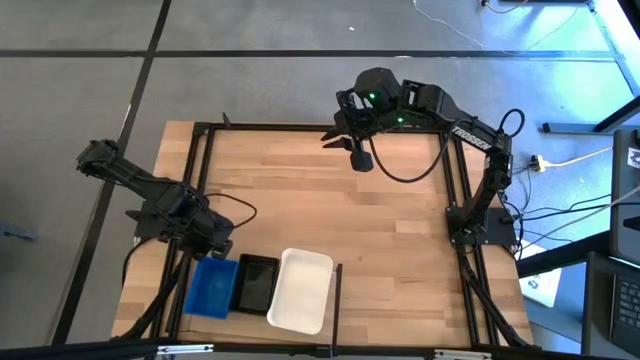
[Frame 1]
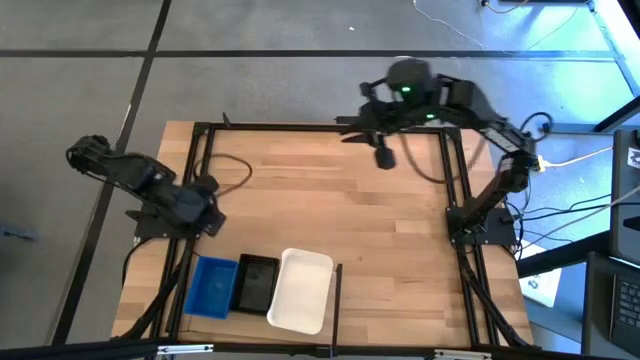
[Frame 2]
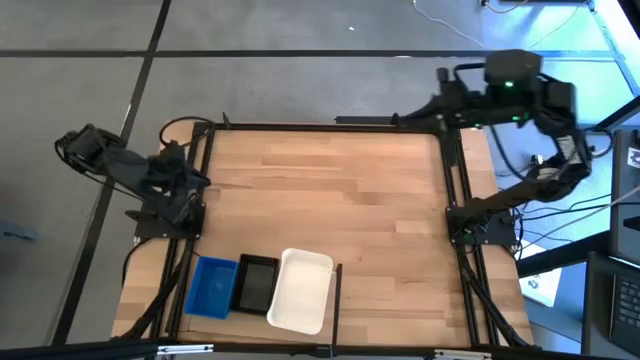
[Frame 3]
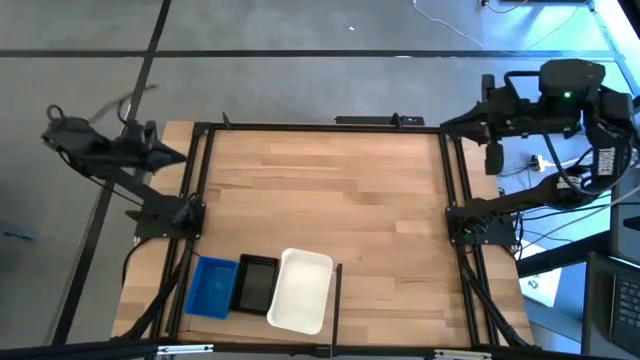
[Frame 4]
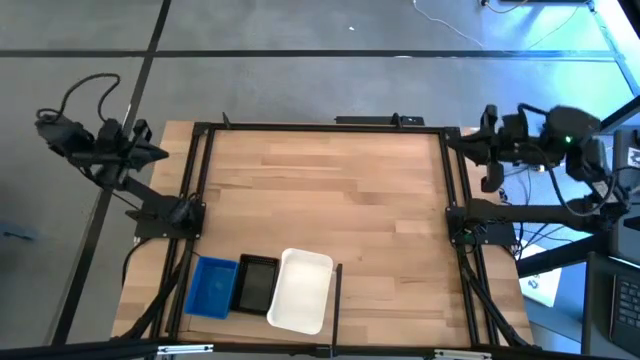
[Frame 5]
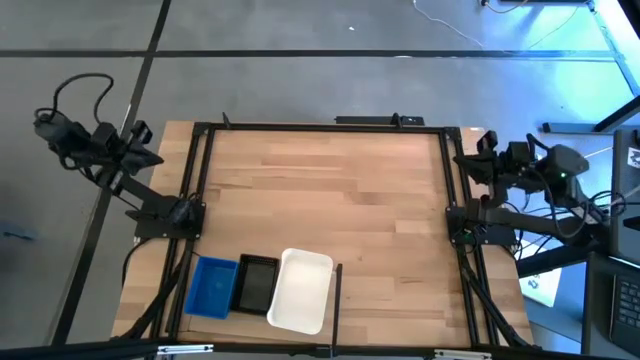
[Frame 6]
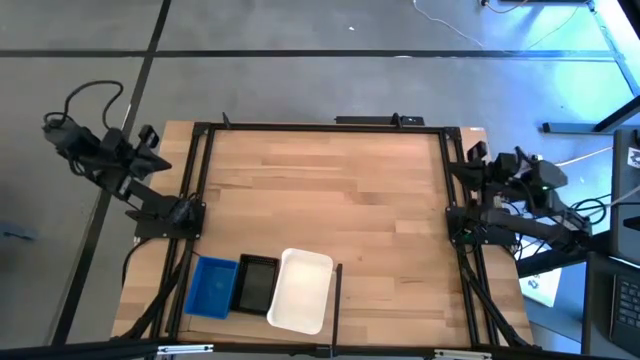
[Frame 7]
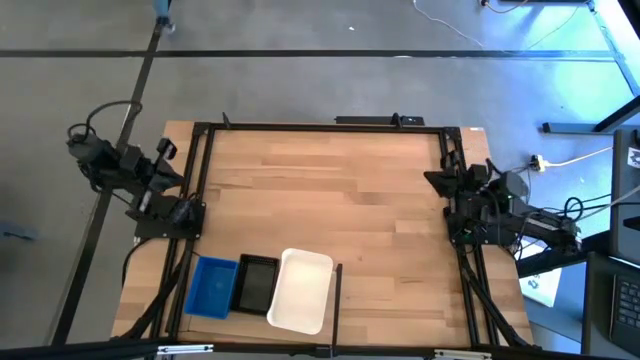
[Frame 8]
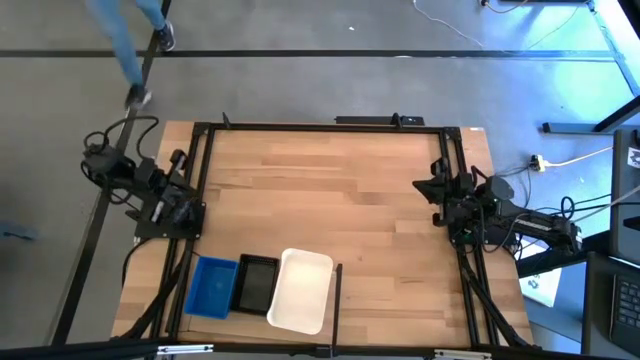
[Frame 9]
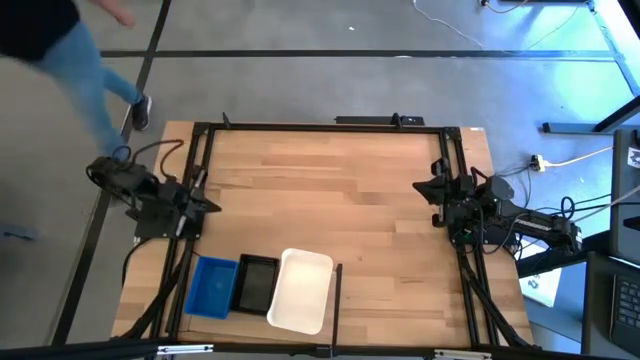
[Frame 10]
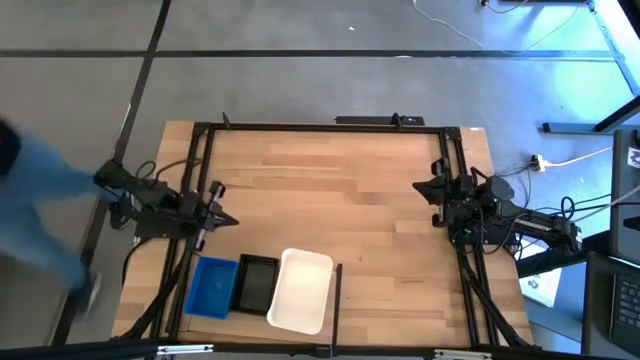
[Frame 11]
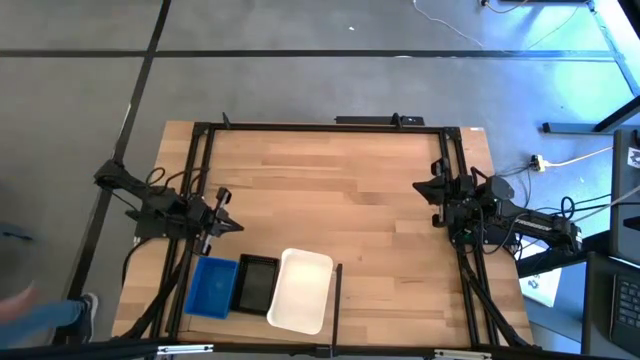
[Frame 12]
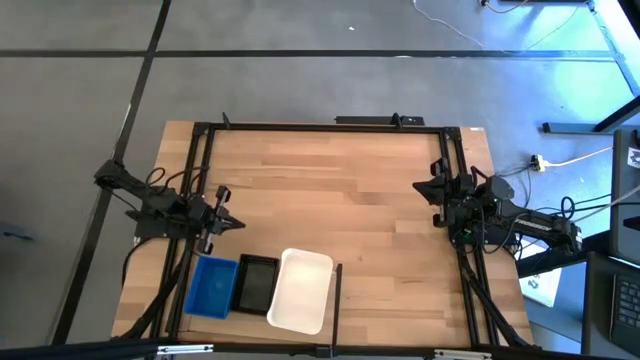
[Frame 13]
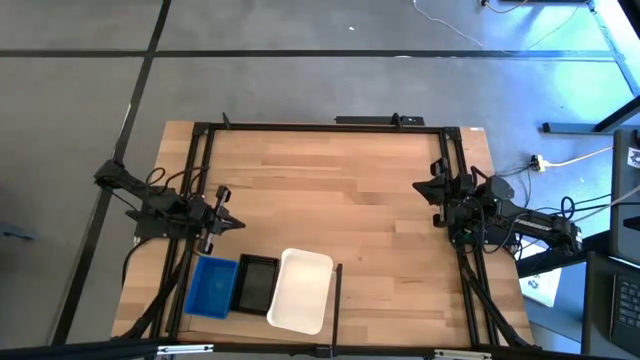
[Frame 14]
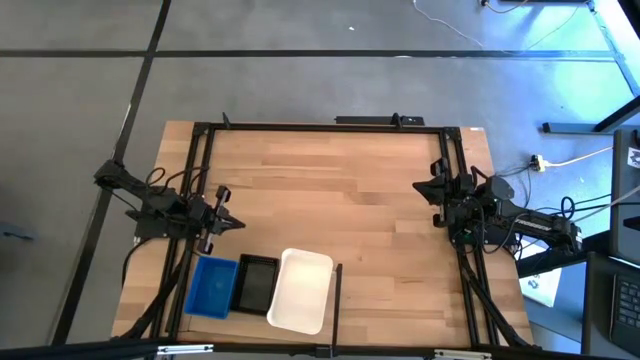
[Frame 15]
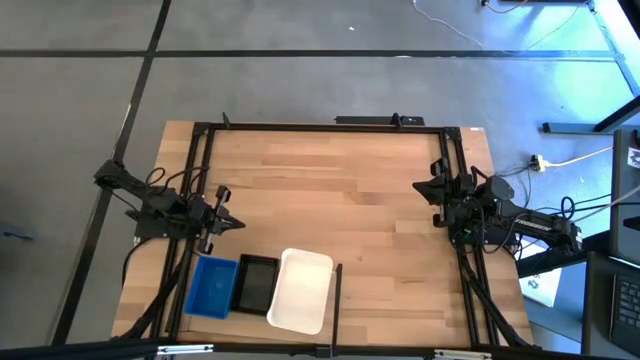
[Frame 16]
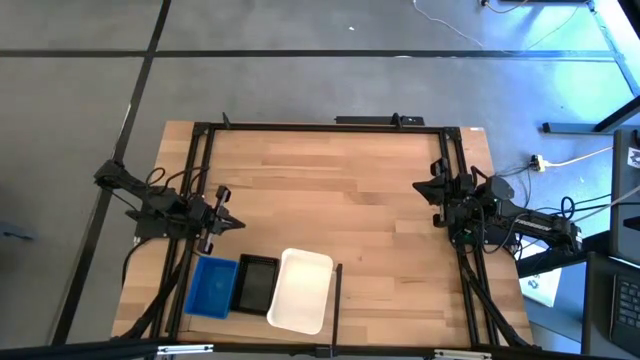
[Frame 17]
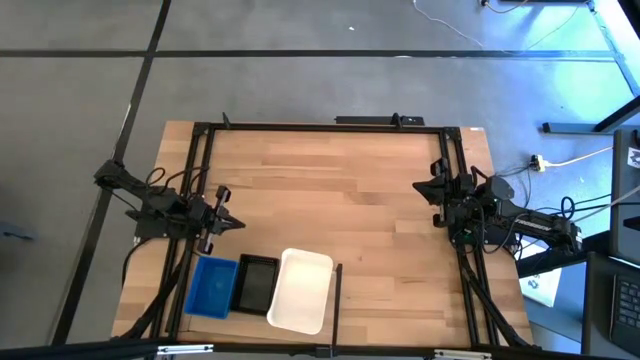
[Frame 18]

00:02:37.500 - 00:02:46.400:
Task: Stack baskets on shelf by color
Return to Home Position

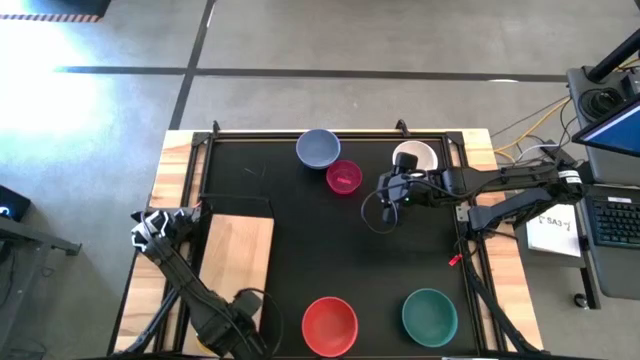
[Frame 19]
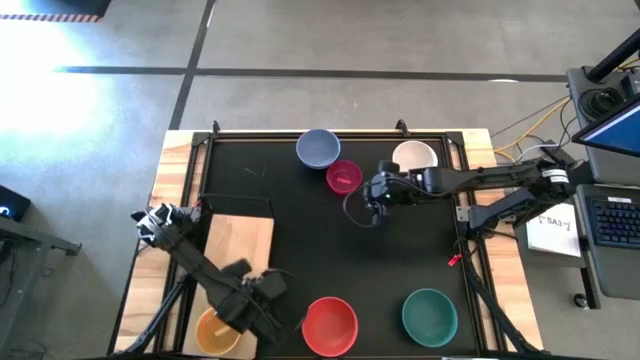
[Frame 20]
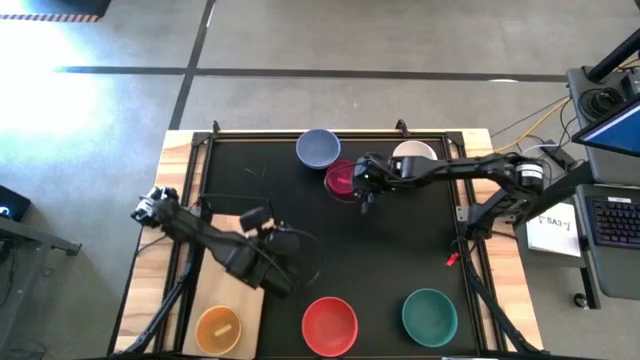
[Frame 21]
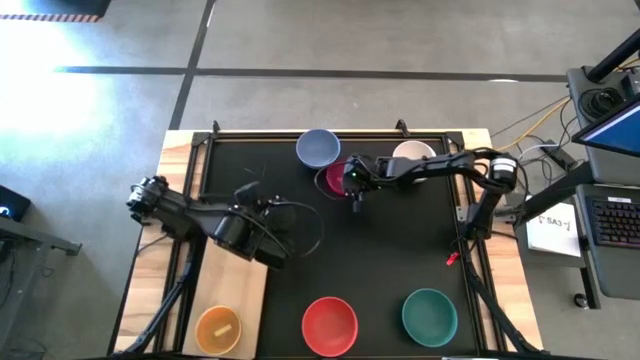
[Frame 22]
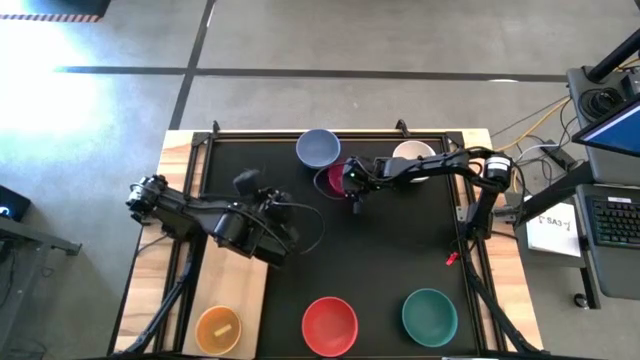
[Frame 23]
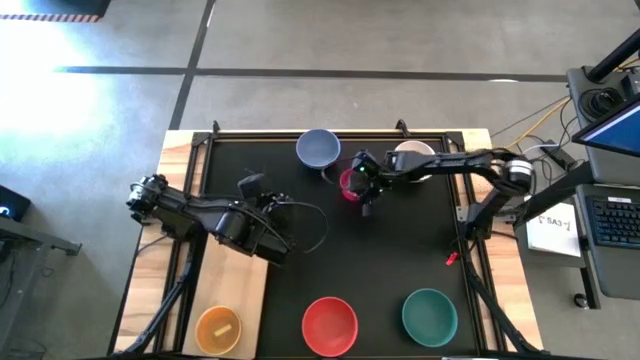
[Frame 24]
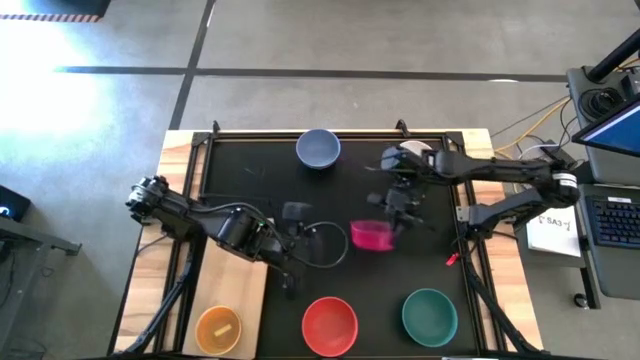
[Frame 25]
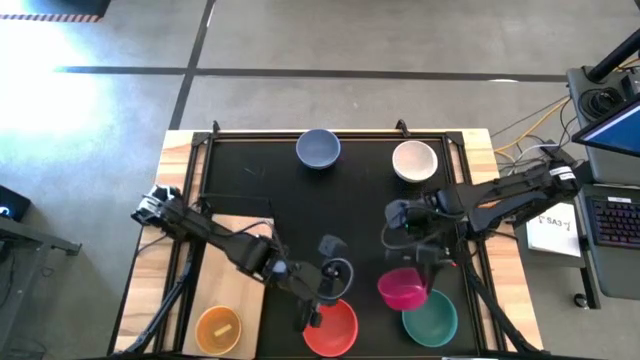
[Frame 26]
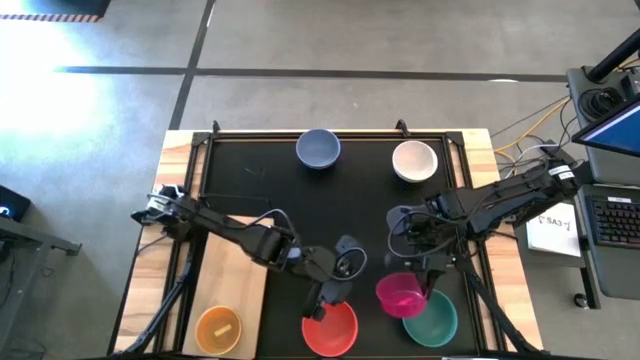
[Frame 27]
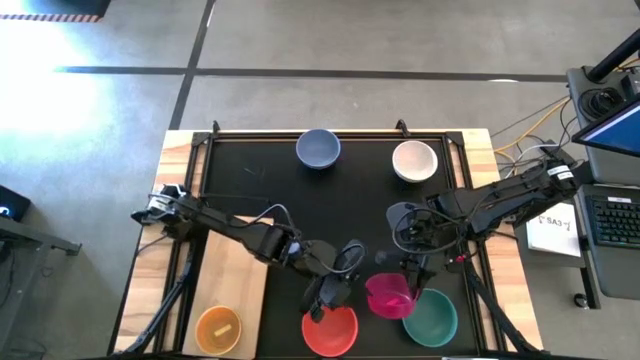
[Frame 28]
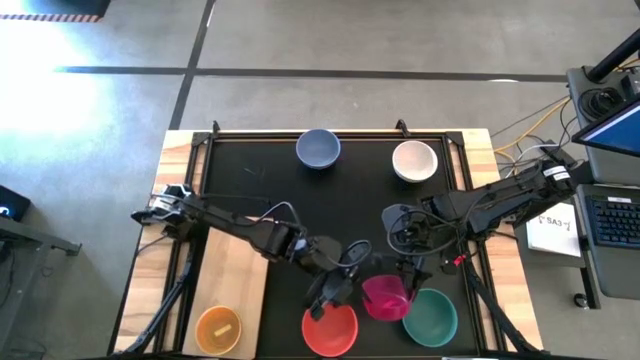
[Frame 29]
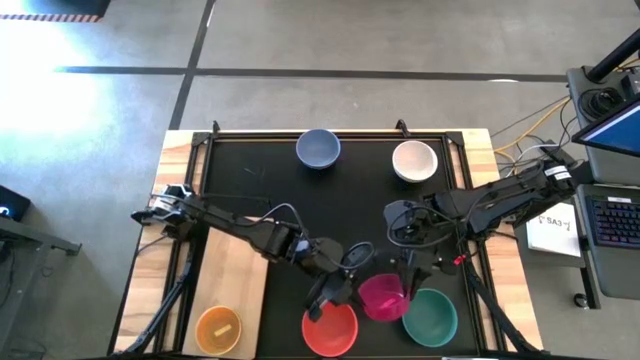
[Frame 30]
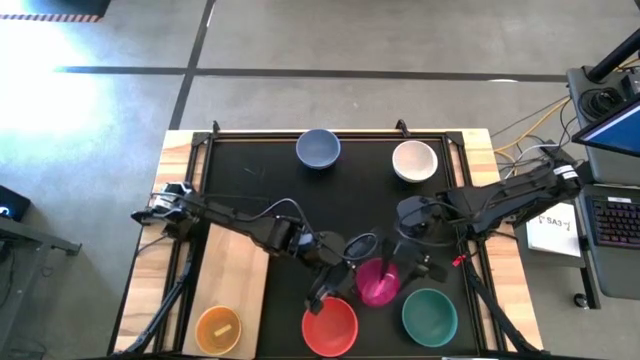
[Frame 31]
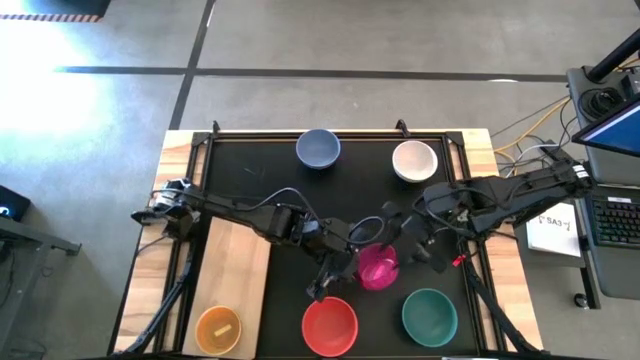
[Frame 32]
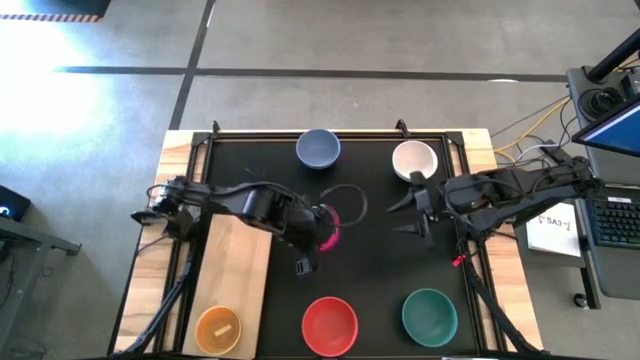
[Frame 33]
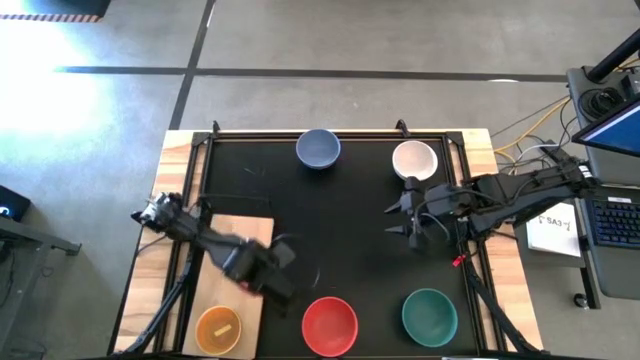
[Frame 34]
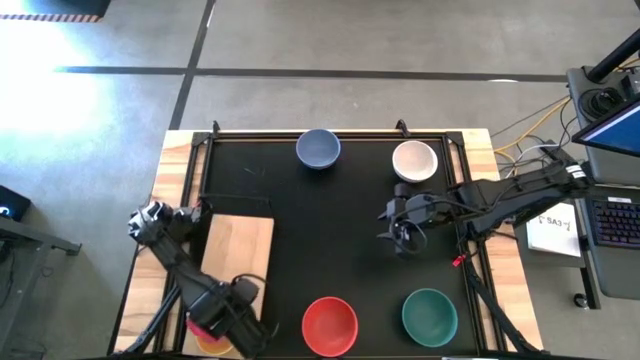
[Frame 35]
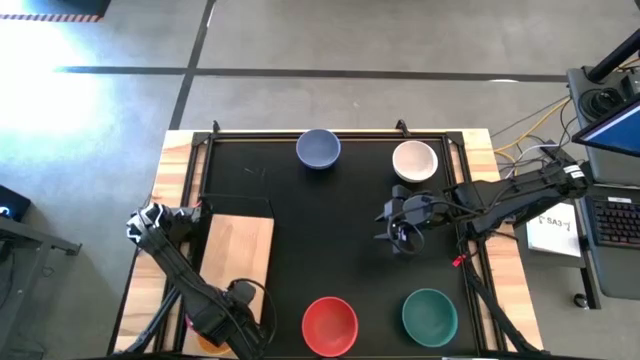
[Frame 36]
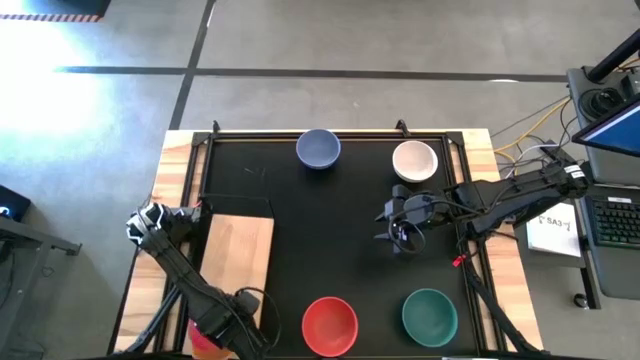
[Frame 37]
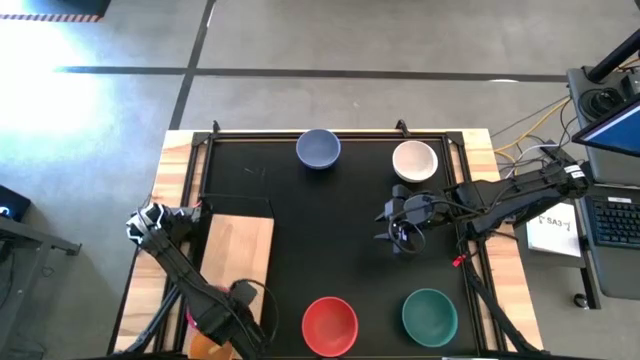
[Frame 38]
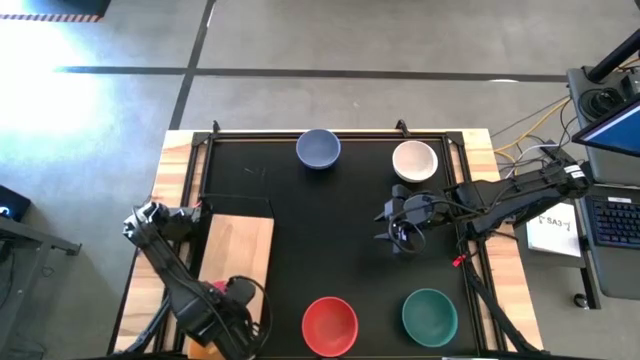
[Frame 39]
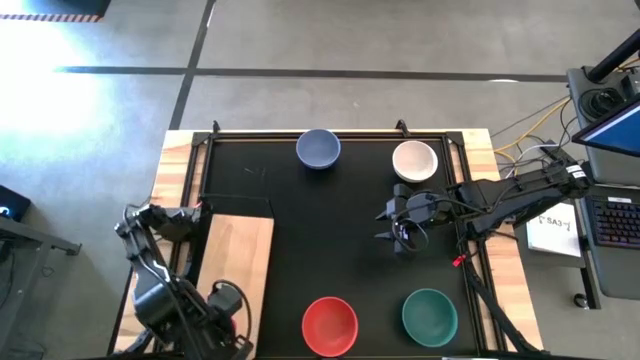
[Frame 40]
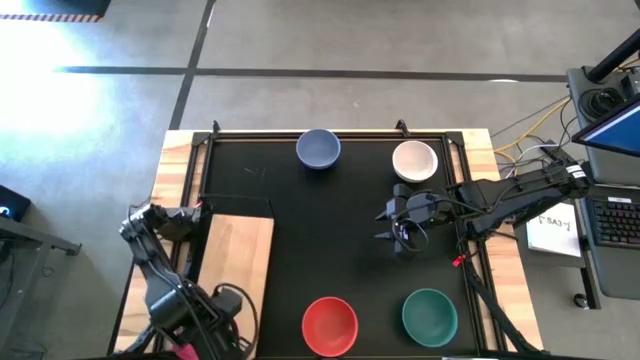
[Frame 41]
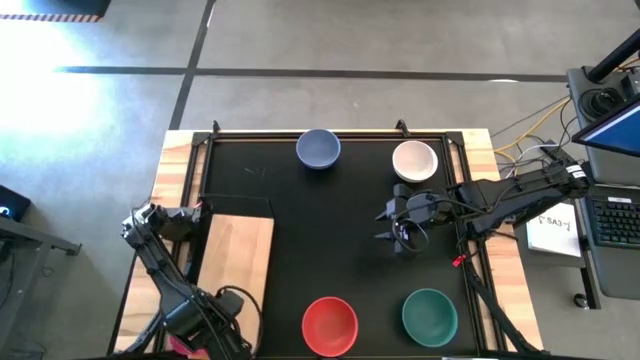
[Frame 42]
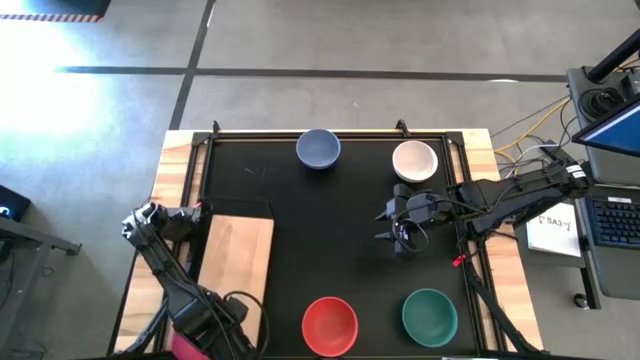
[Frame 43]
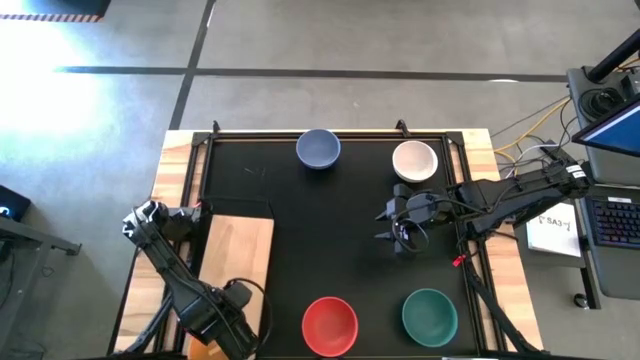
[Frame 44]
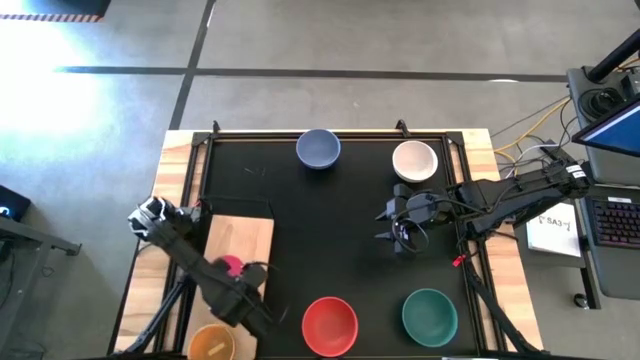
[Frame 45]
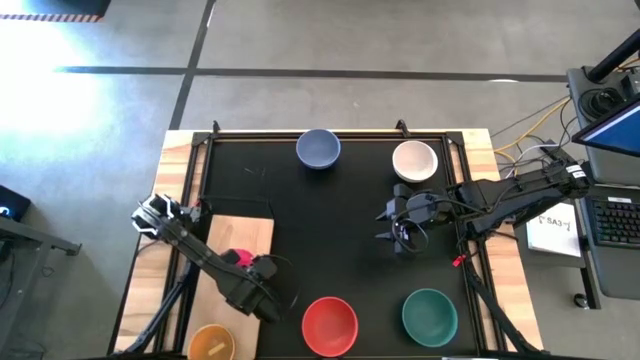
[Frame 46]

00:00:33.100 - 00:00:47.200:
Task: Place and stack bowls onto a shelf
Put the pink bowl on the shelf
